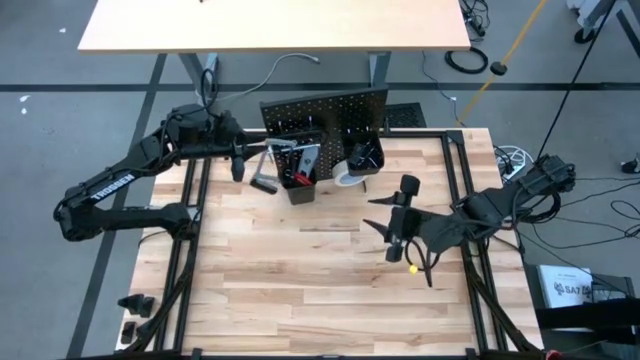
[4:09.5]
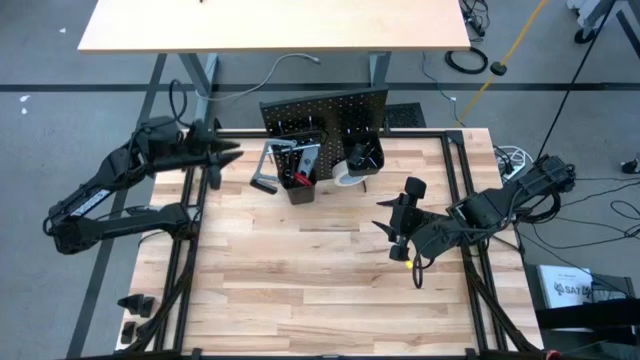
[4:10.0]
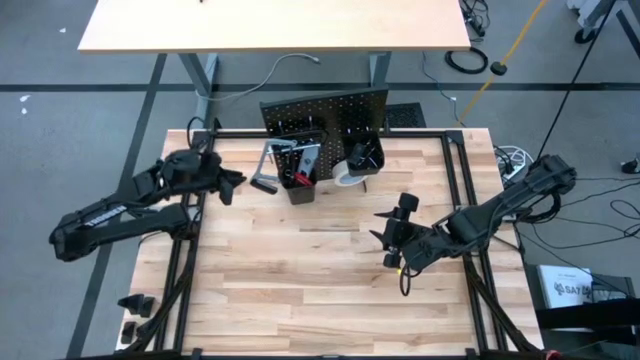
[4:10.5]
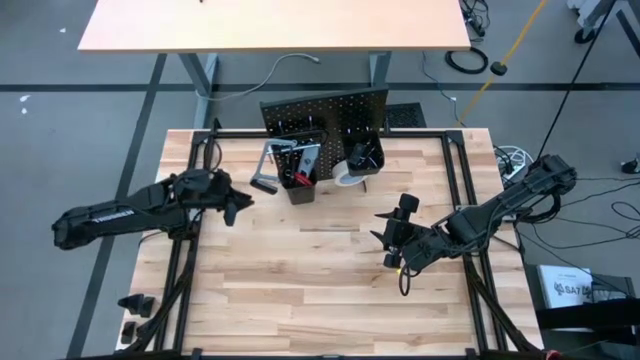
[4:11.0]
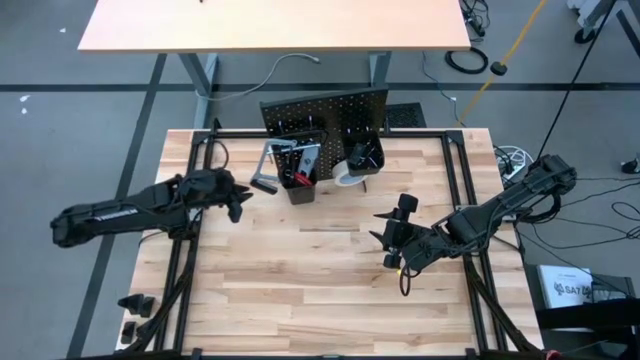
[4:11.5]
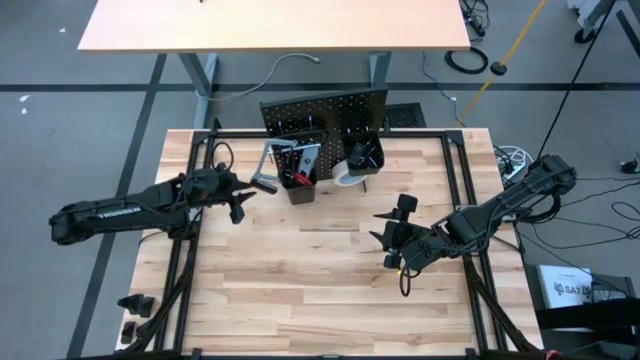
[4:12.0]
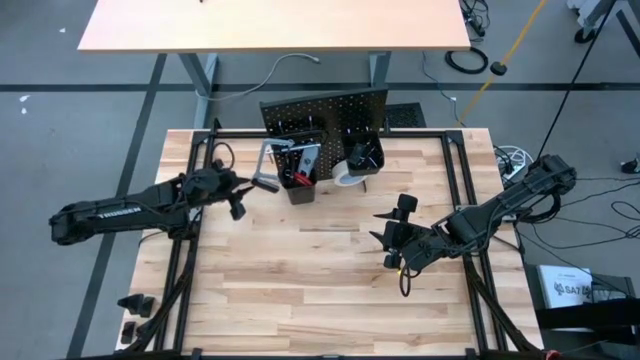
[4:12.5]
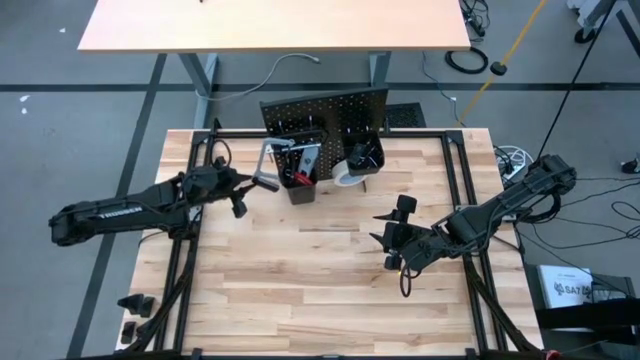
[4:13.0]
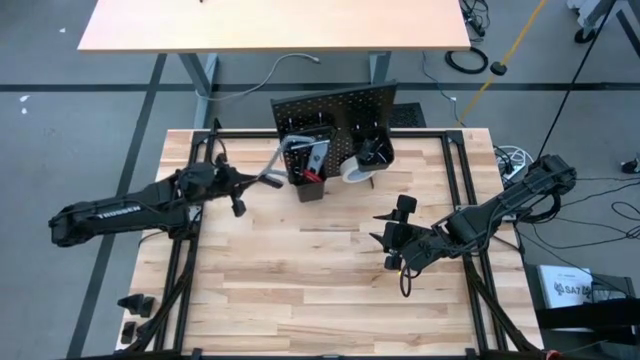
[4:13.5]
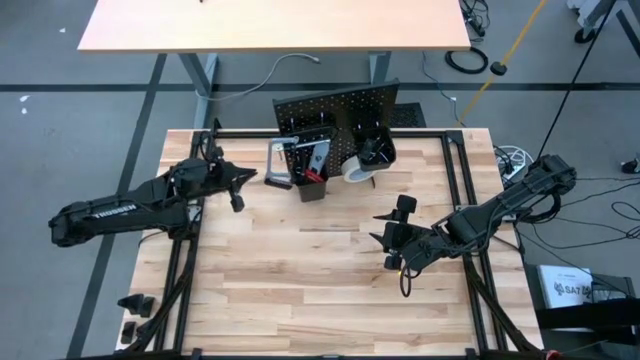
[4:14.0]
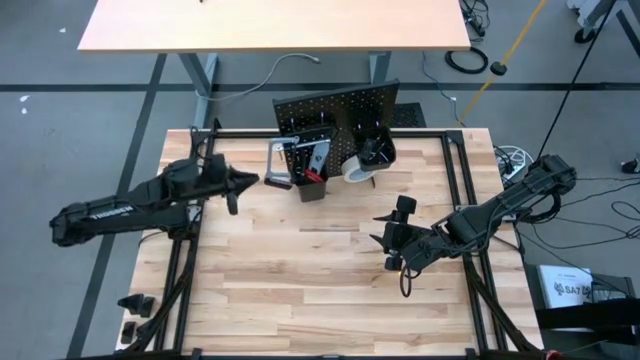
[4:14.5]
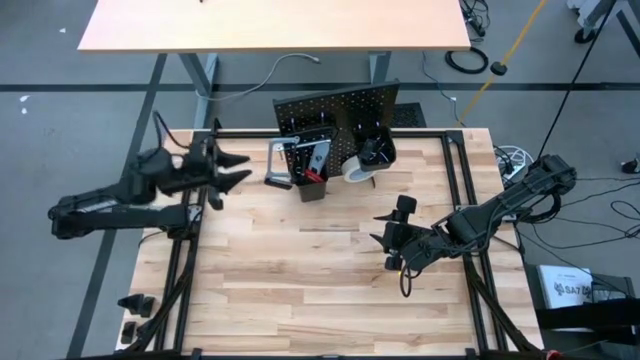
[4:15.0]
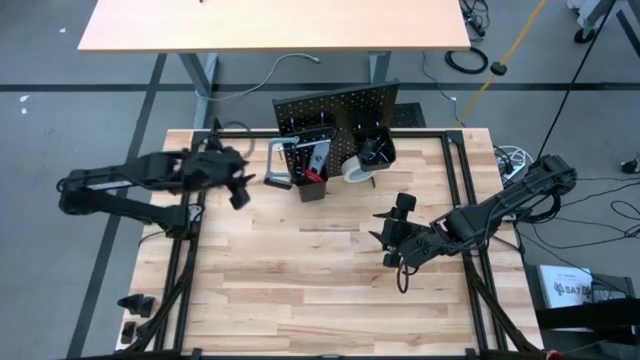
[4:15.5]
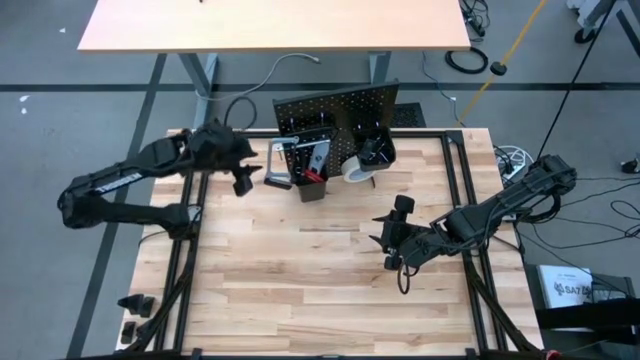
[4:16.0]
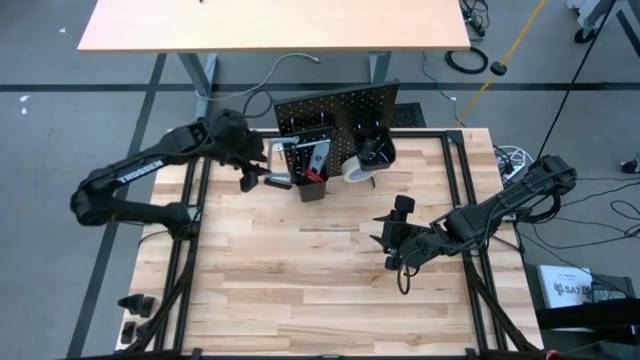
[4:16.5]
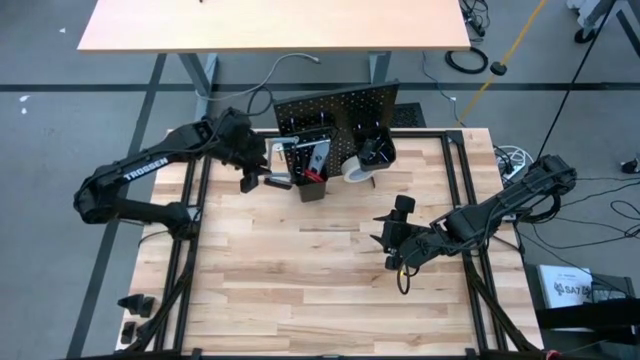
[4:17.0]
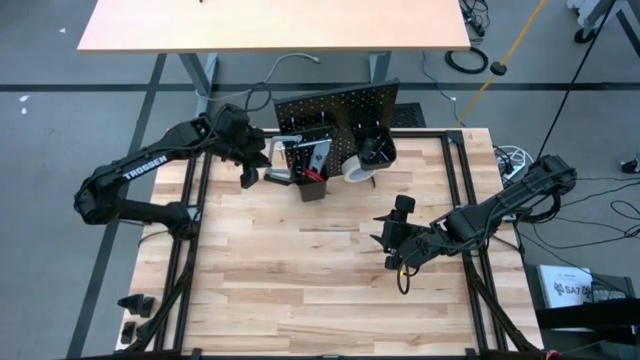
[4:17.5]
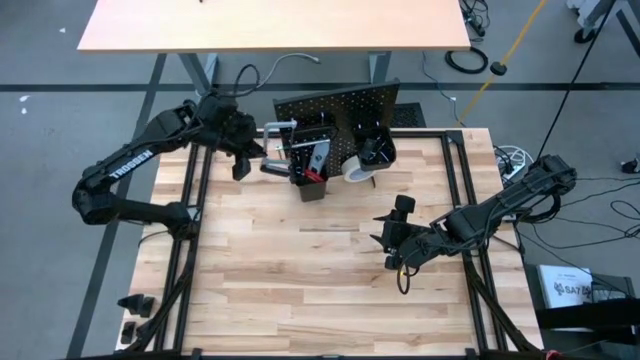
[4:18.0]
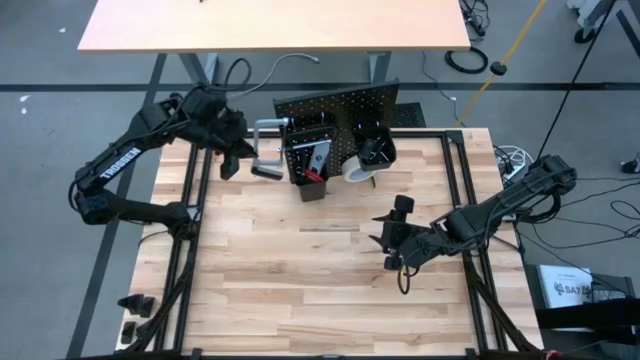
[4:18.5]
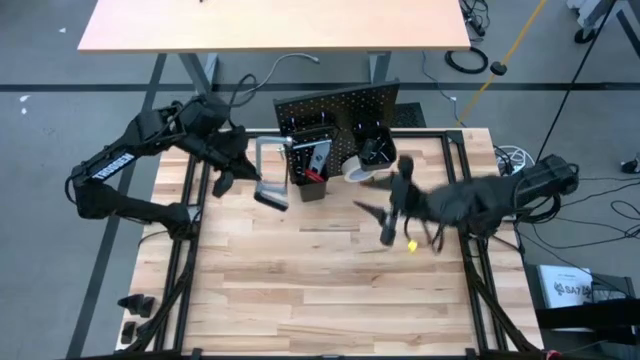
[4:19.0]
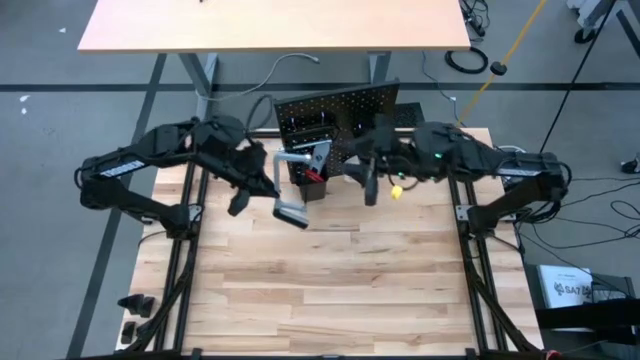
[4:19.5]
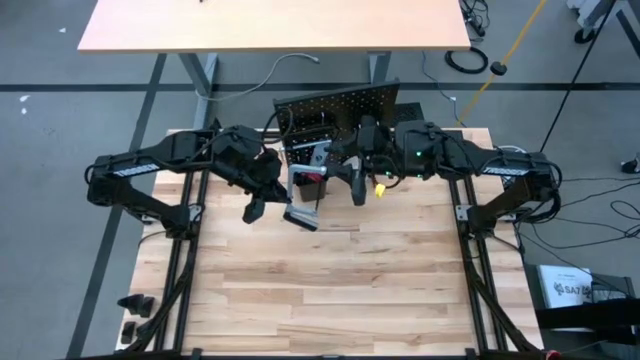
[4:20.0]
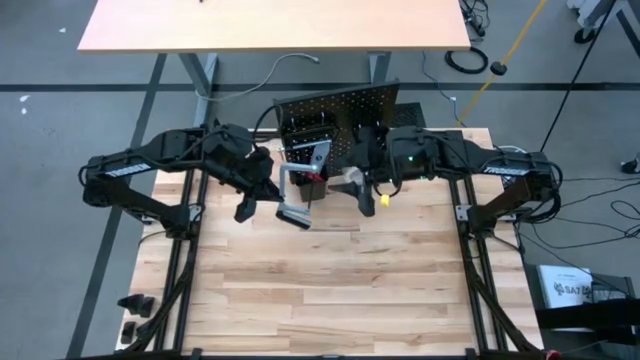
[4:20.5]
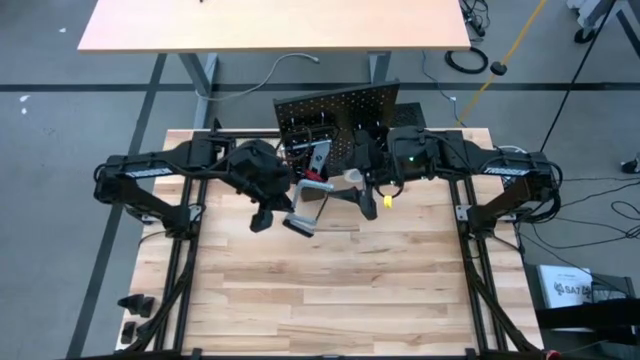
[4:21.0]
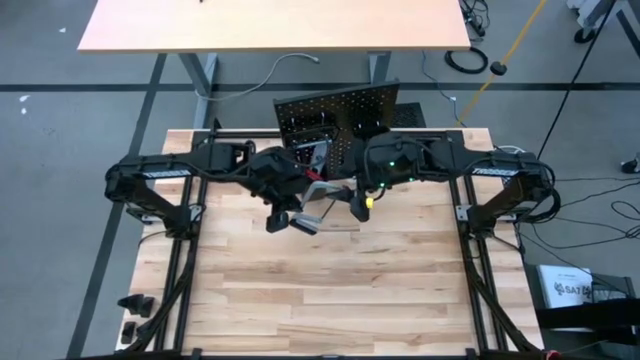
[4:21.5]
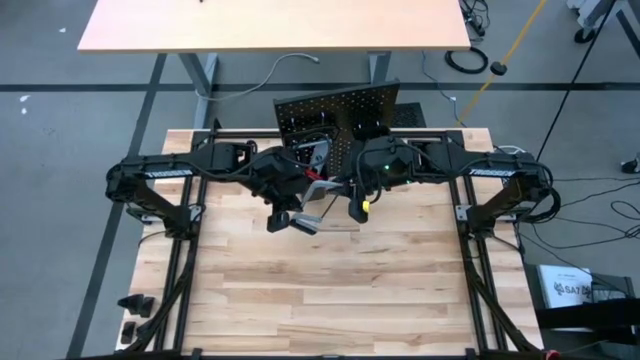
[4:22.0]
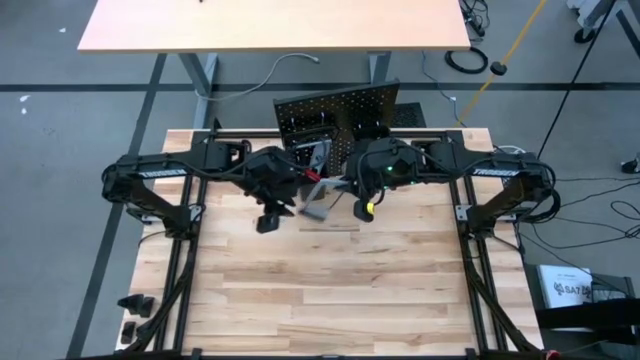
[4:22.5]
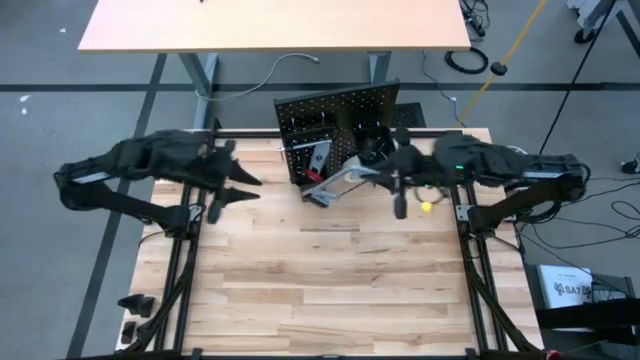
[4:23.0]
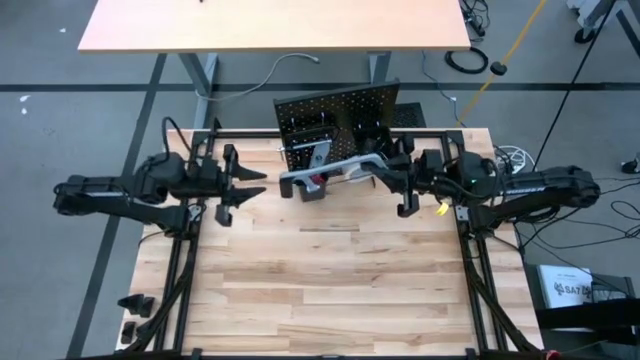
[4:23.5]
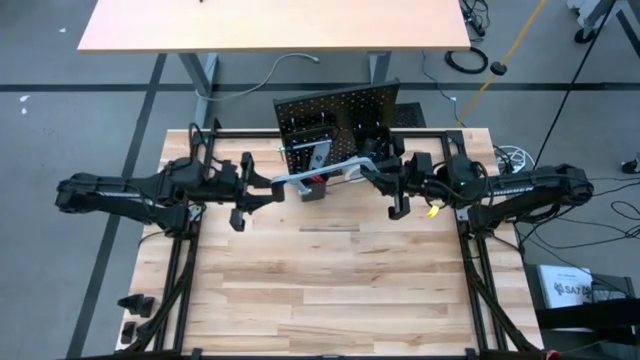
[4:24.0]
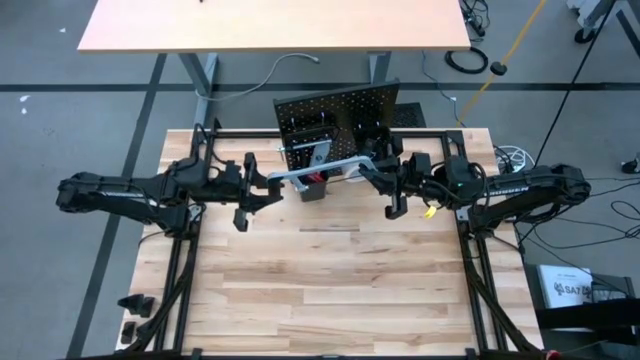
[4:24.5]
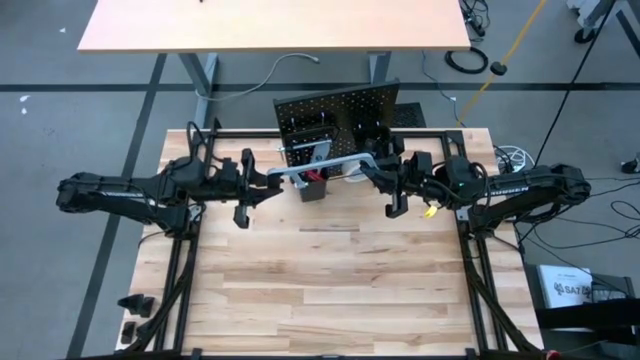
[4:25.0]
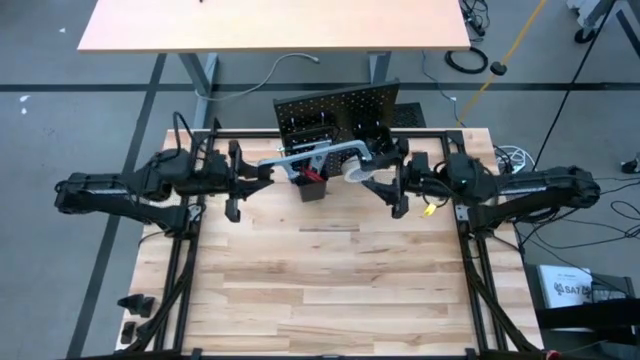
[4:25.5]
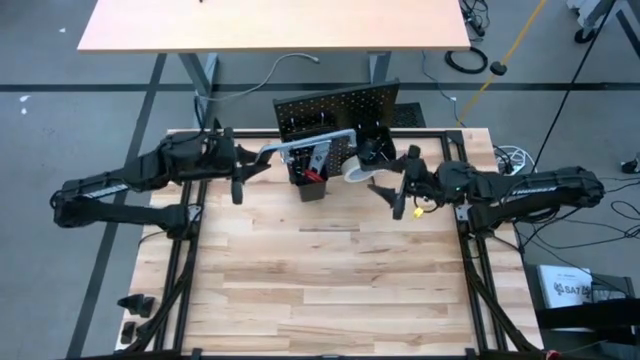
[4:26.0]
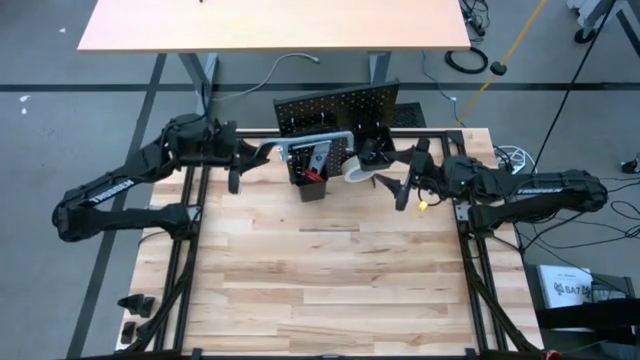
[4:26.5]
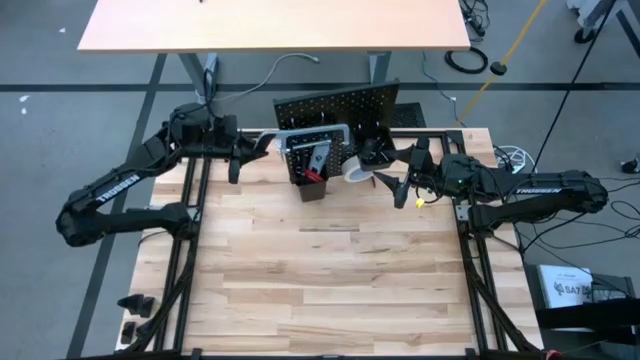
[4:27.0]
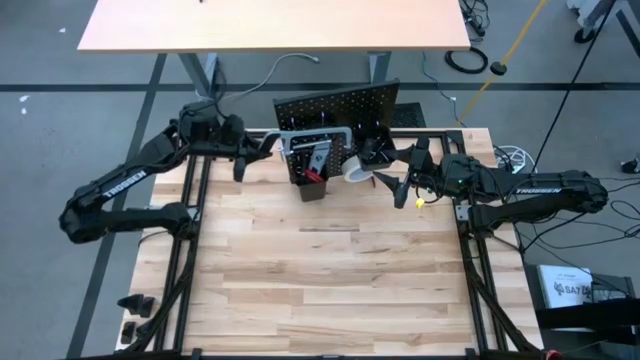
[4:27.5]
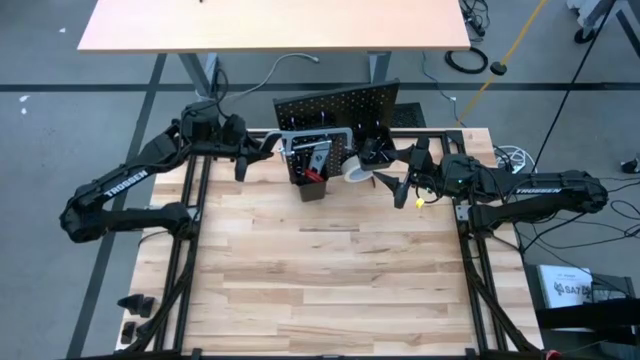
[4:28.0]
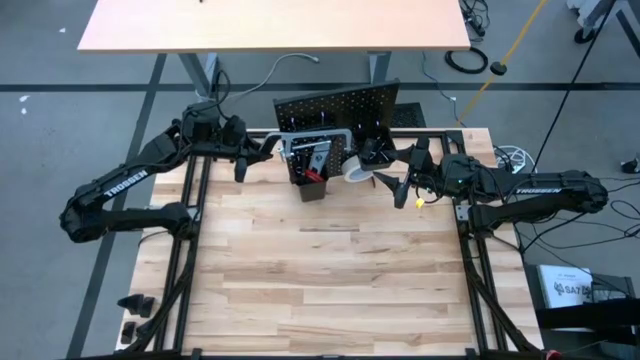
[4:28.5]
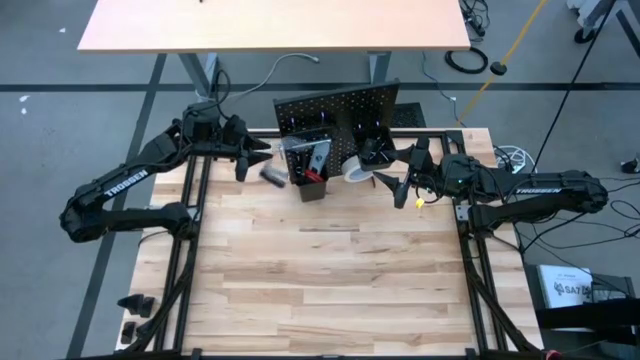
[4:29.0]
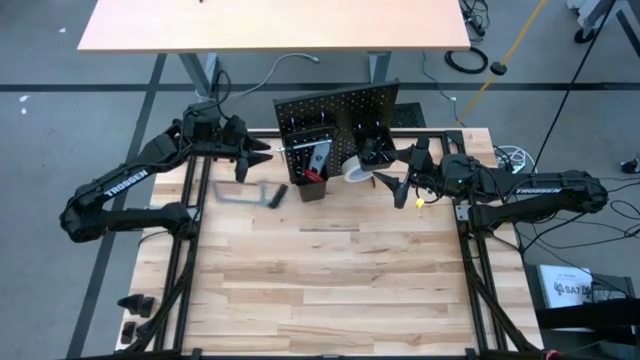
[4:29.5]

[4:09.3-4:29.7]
Task: Hang tools onto peg board
Hang the hacksaw on the pegboard
